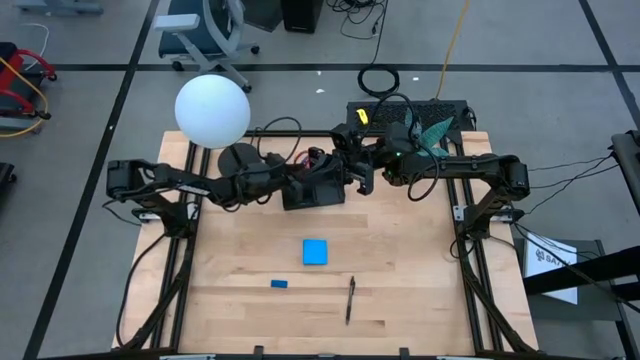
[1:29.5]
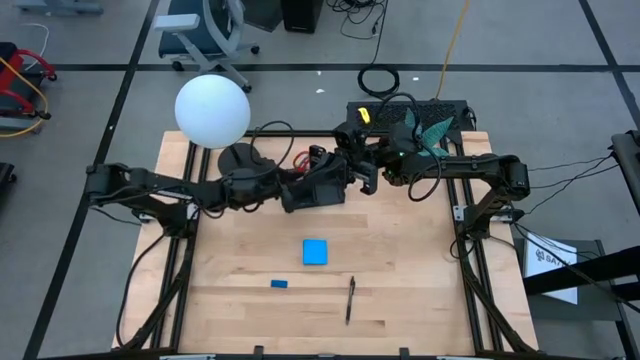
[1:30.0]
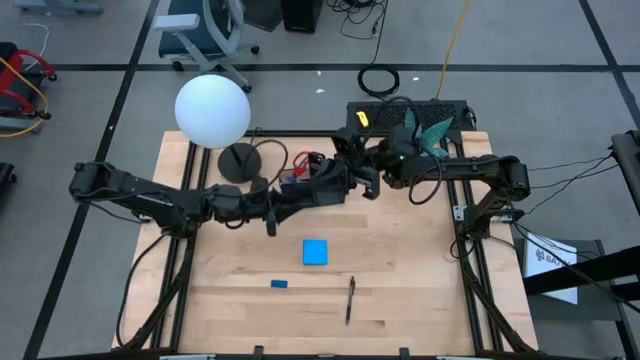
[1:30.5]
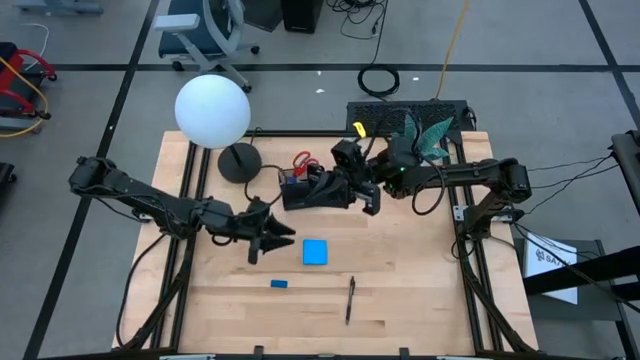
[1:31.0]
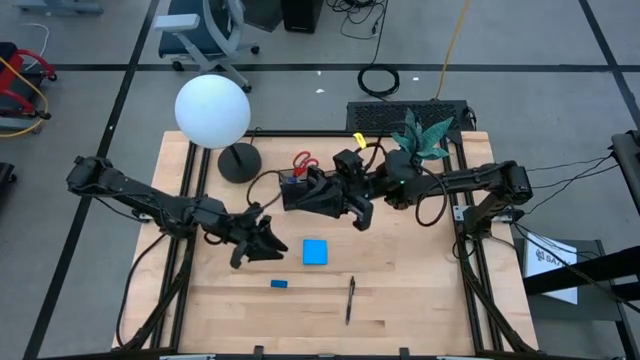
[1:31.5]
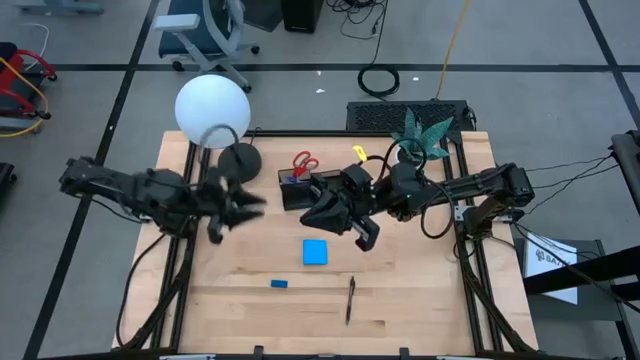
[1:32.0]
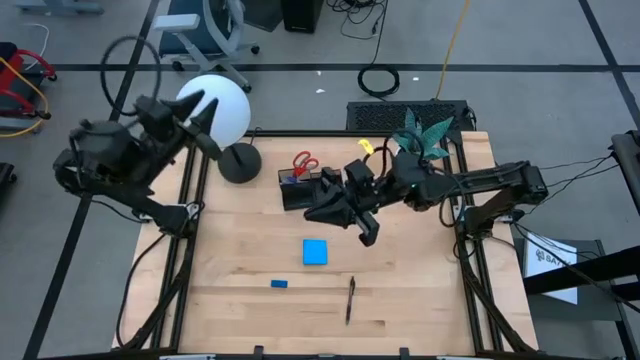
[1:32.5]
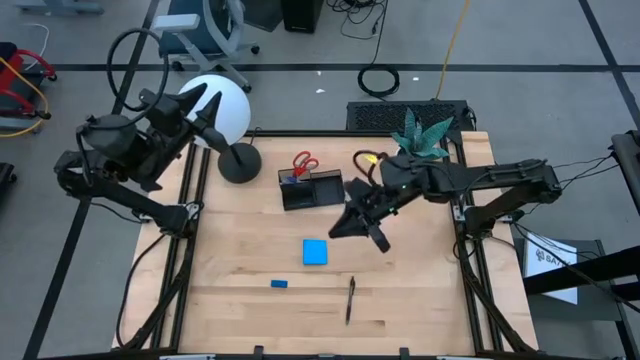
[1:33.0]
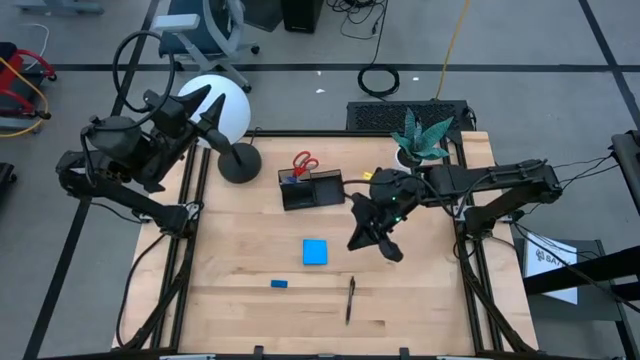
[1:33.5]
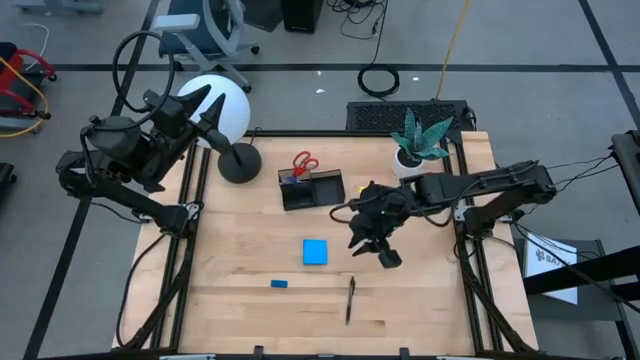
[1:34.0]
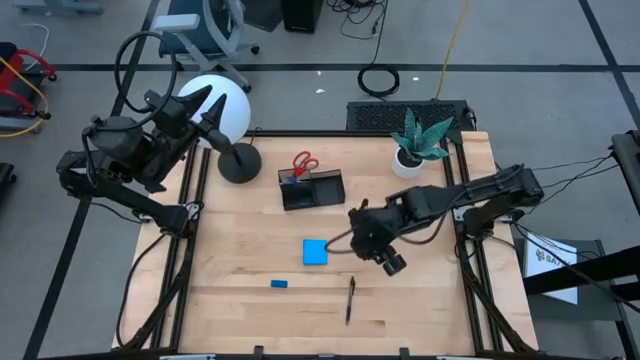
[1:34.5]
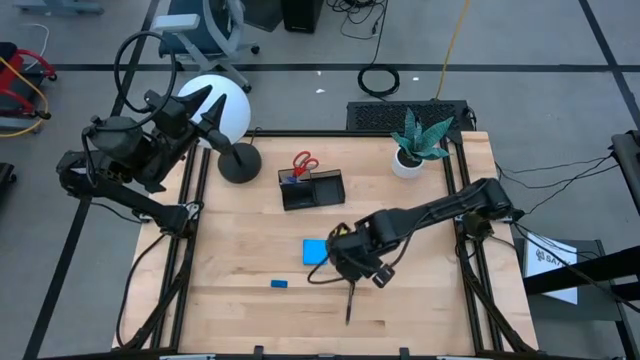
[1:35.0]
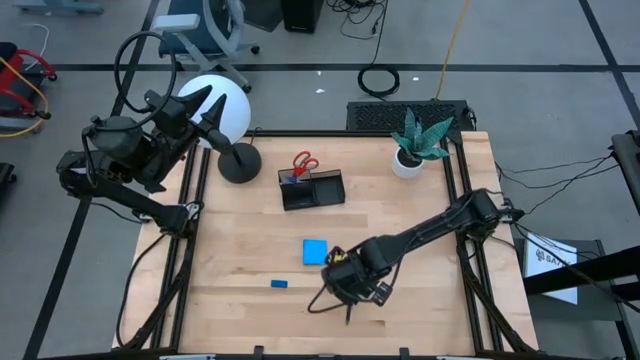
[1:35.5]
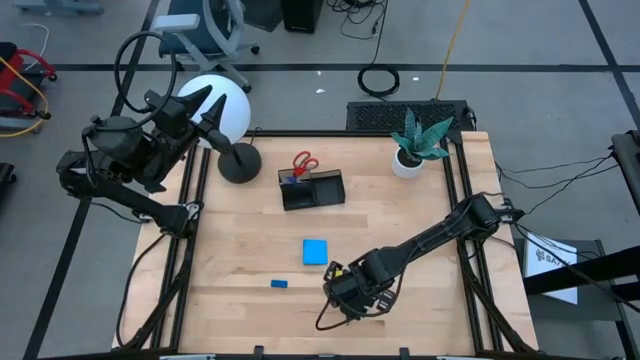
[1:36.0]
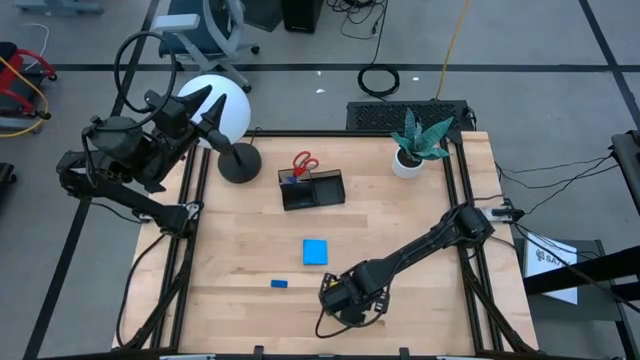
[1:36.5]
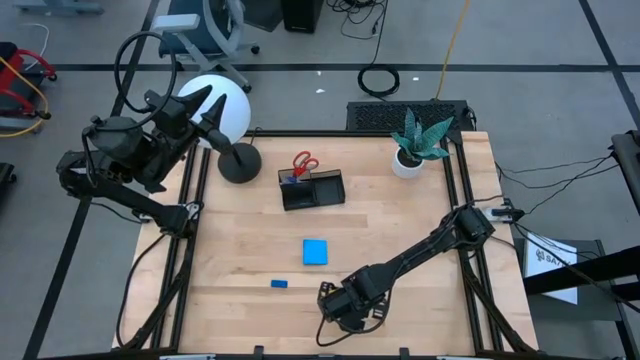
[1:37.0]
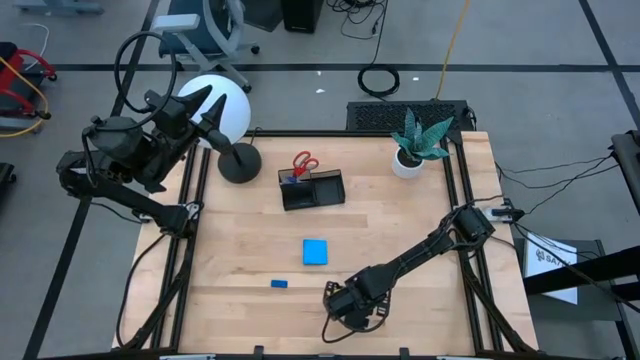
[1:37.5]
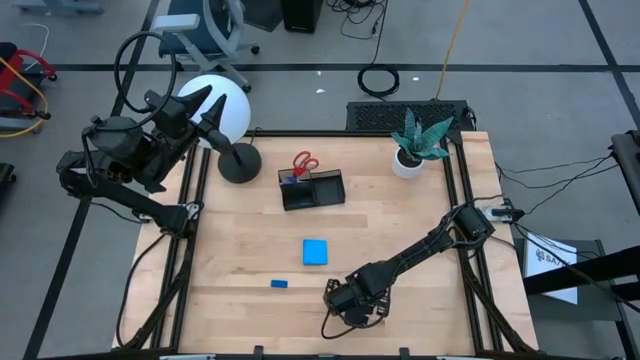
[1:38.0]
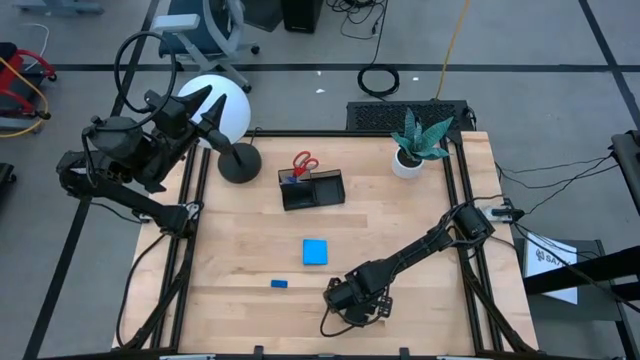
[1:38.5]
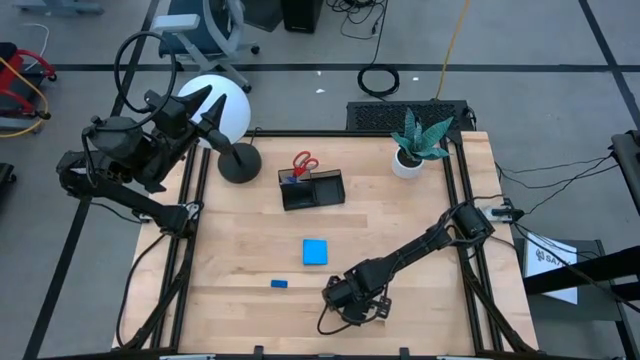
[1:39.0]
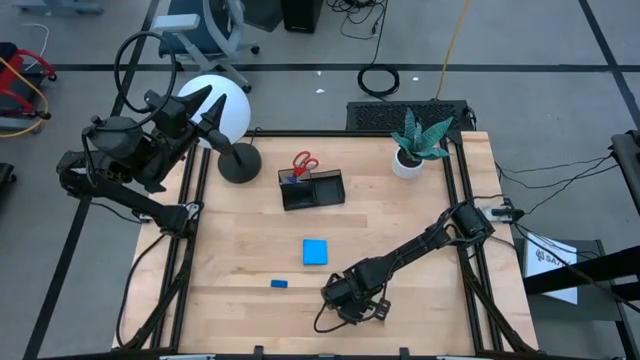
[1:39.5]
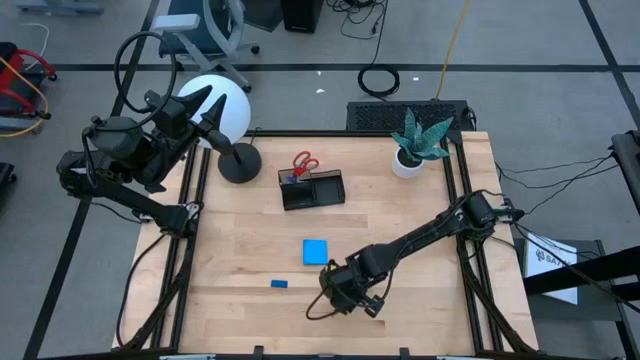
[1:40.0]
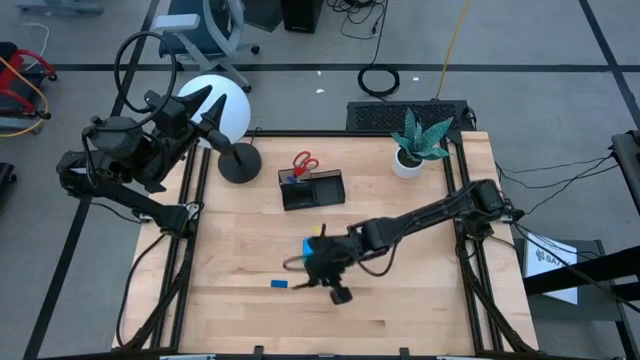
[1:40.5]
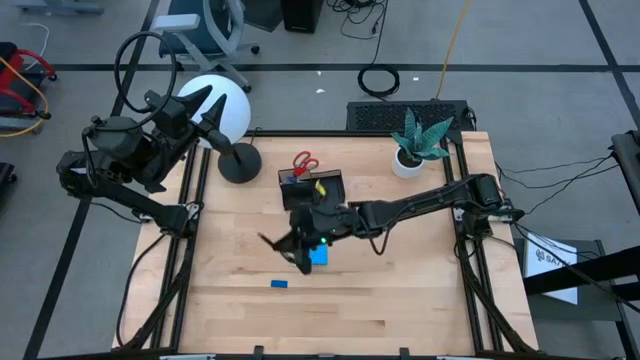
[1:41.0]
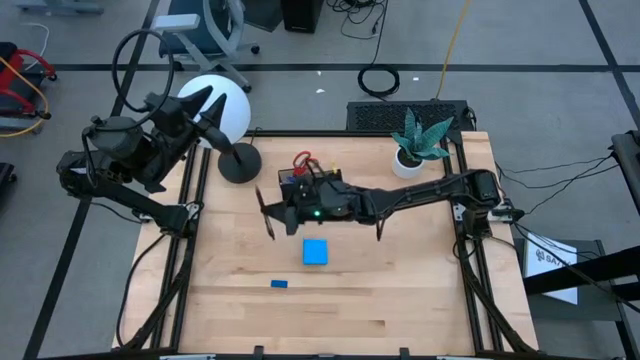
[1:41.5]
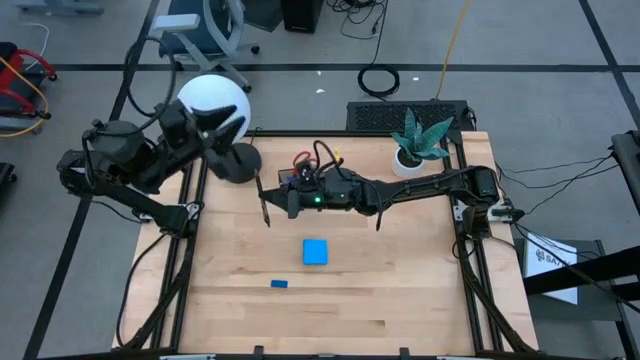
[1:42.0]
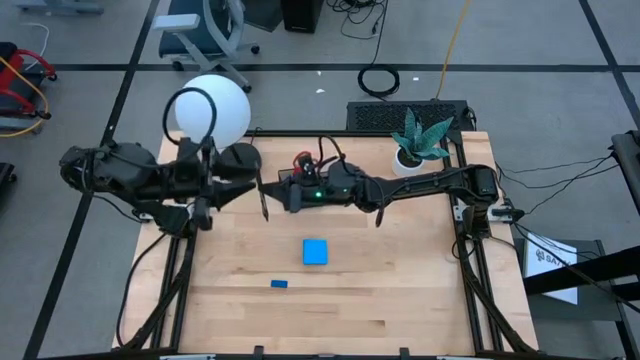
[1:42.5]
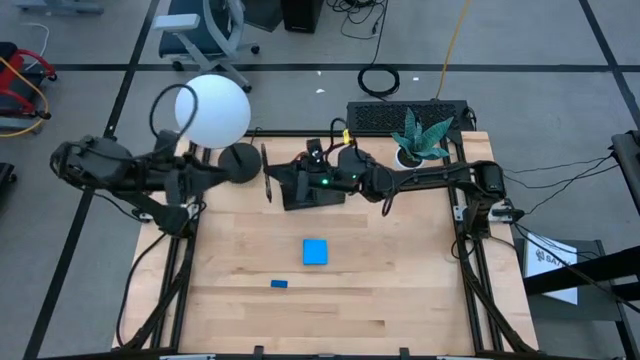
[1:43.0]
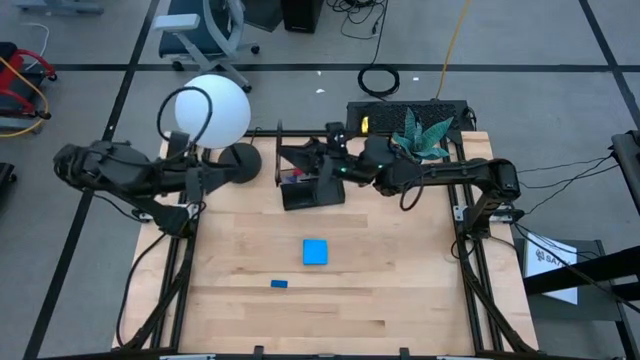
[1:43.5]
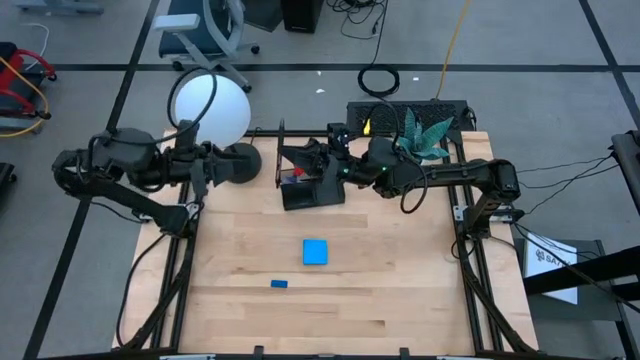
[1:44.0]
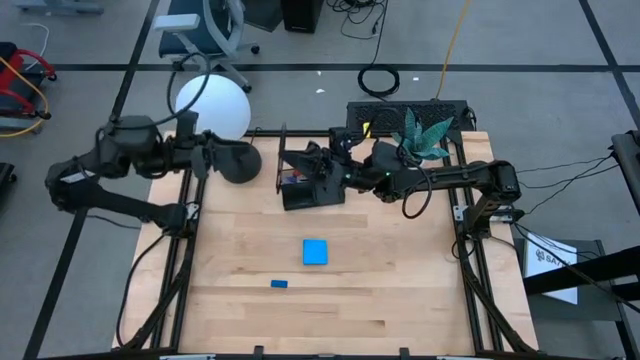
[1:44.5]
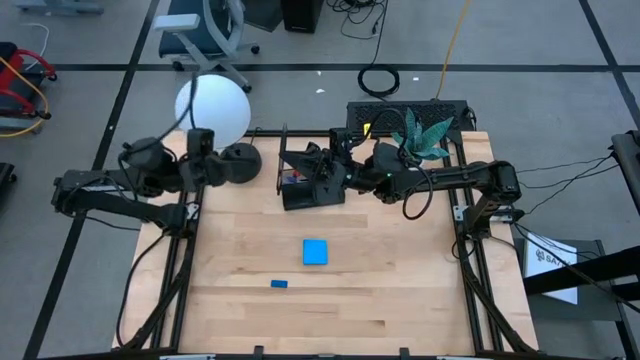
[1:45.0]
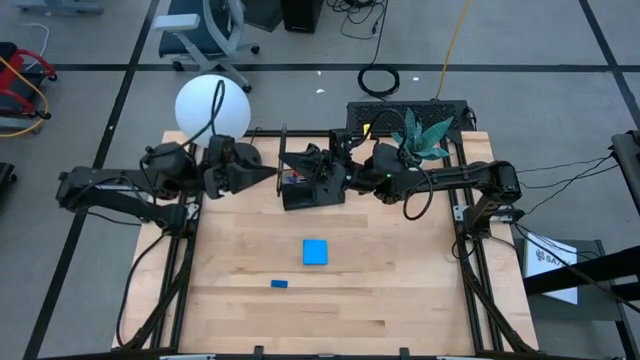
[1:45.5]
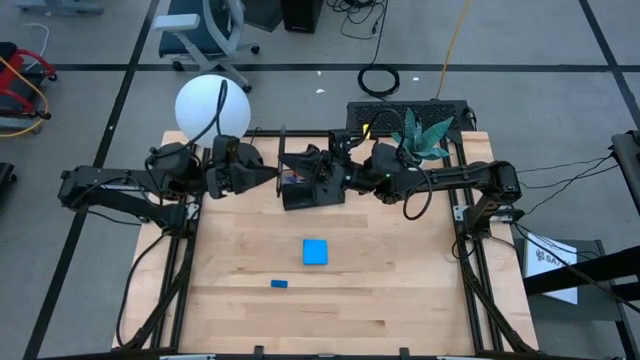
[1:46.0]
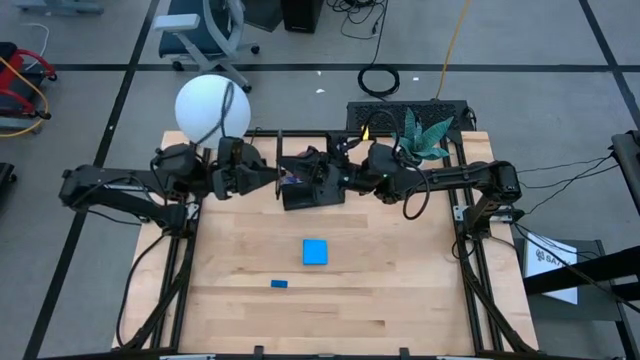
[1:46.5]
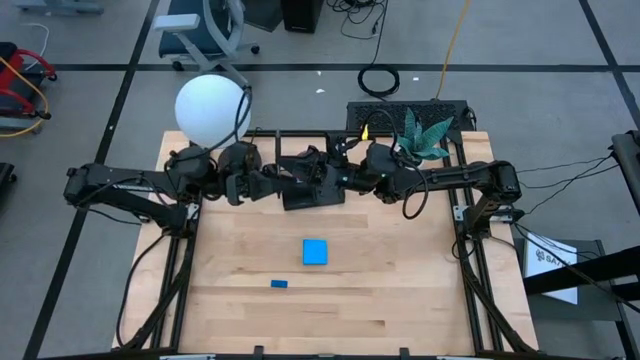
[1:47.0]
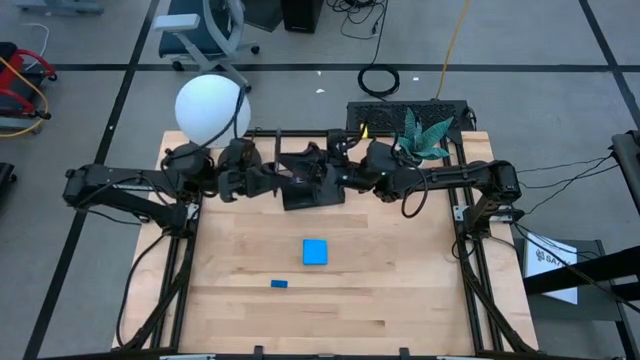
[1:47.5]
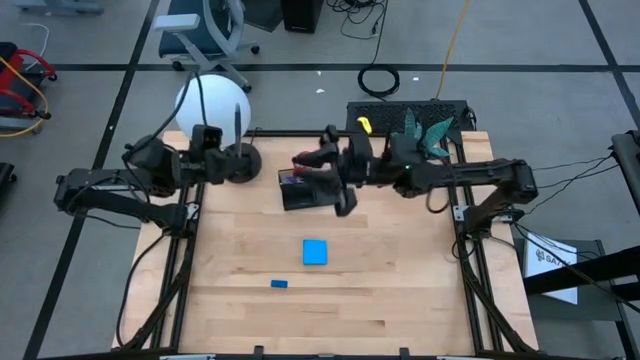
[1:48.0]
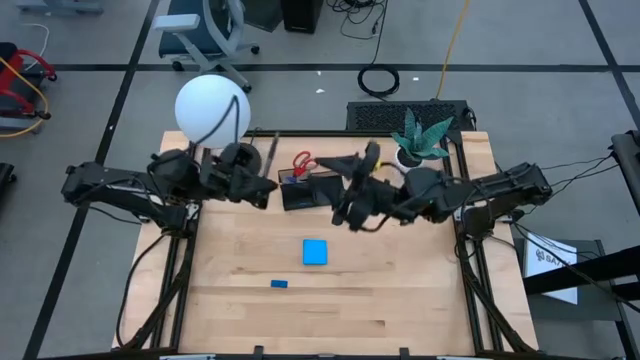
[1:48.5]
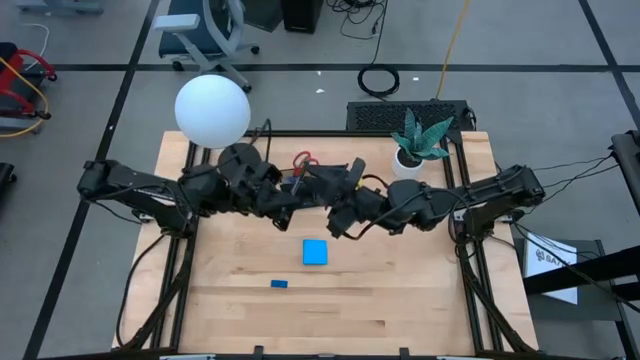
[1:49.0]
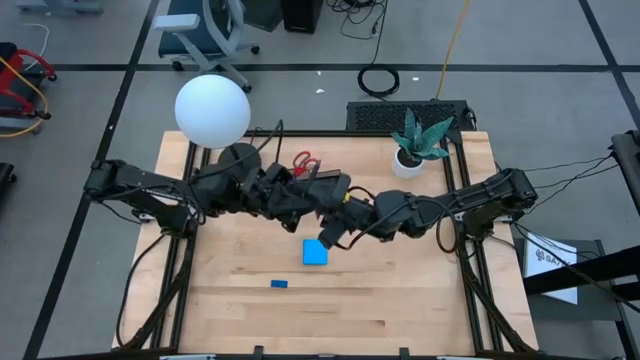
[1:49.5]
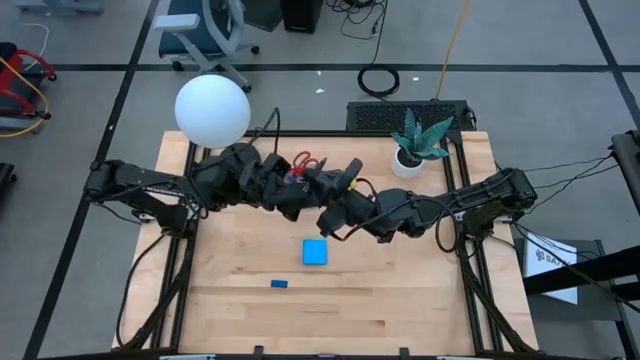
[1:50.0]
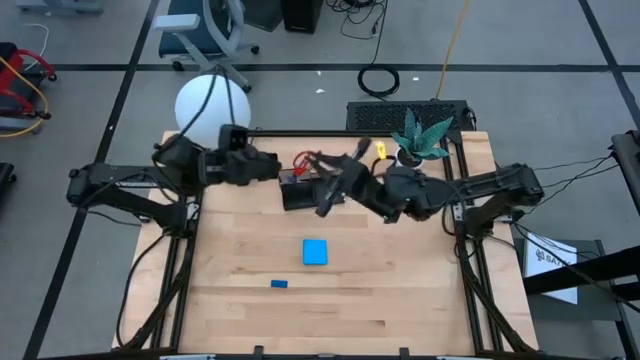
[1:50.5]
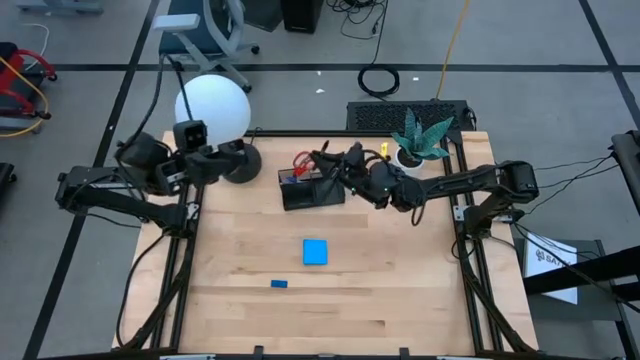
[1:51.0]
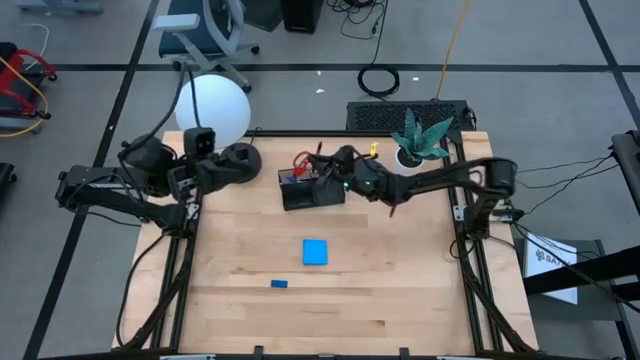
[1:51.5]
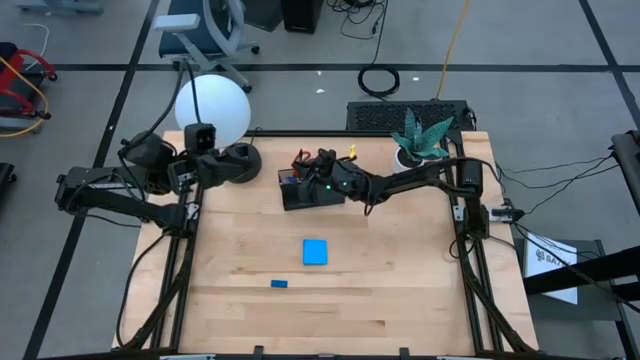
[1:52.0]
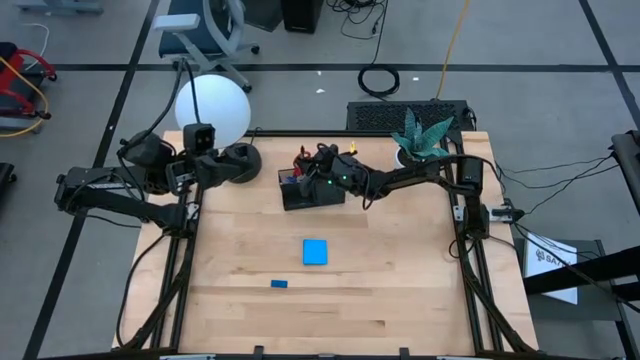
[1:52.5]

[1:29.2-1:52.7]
Task: Pick and place office supplies into organizer
Put the black pen into the desk organizer
